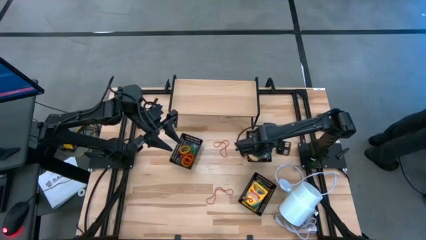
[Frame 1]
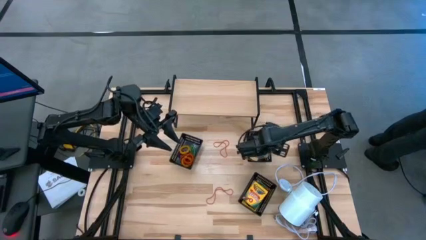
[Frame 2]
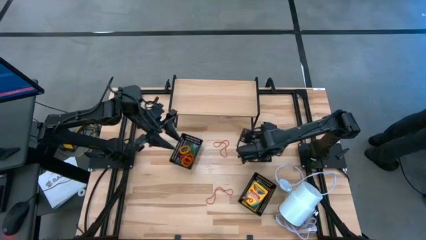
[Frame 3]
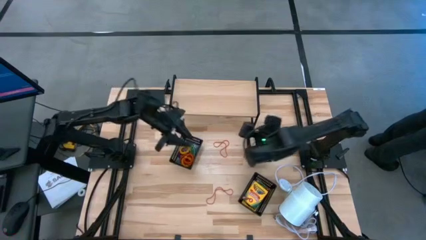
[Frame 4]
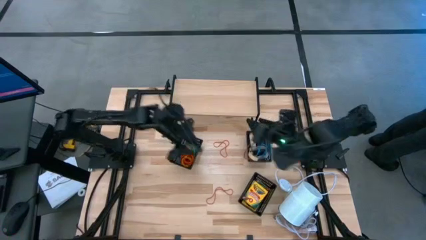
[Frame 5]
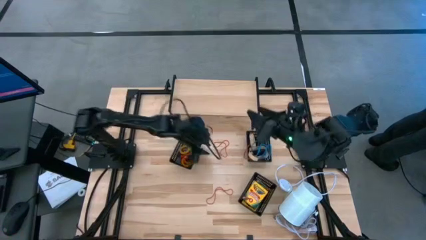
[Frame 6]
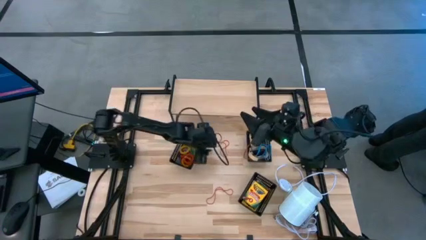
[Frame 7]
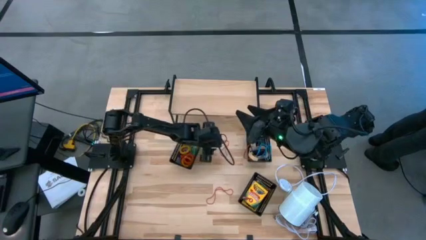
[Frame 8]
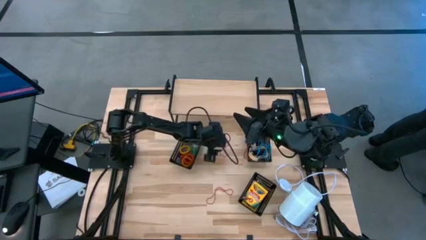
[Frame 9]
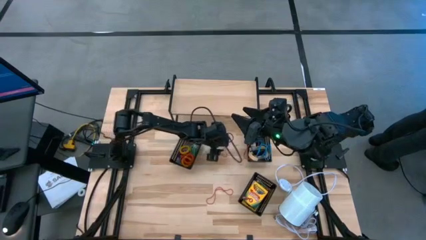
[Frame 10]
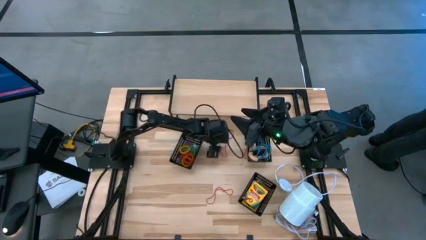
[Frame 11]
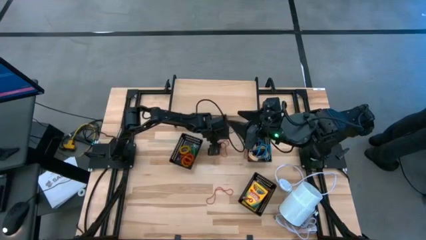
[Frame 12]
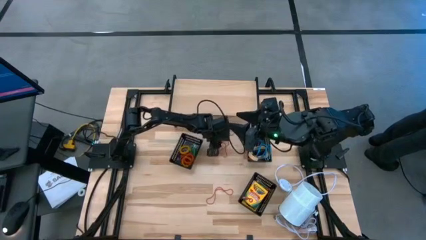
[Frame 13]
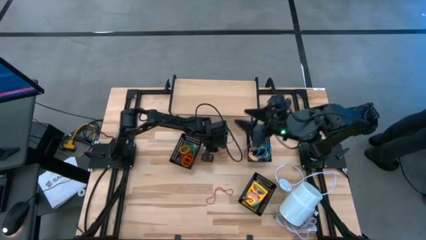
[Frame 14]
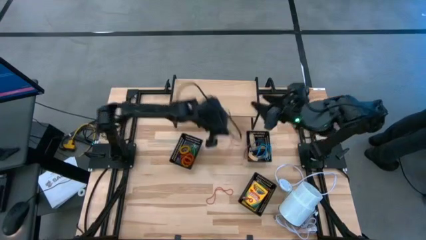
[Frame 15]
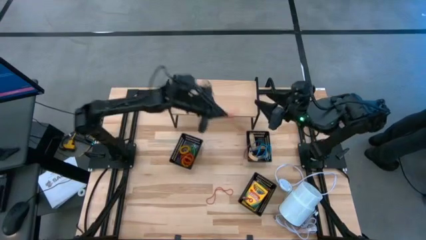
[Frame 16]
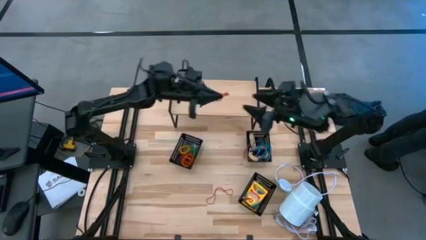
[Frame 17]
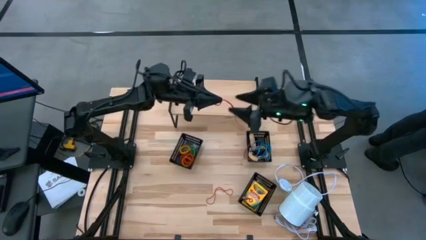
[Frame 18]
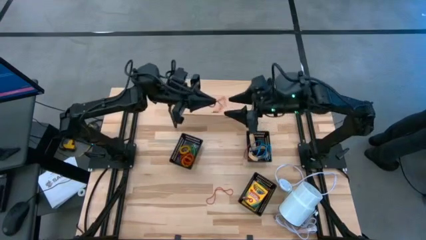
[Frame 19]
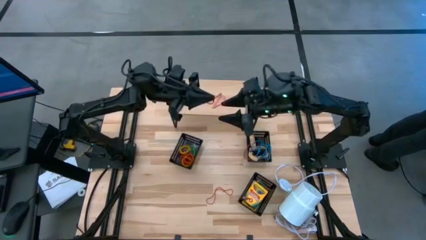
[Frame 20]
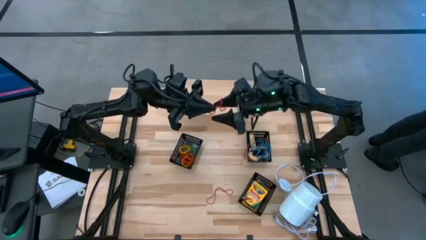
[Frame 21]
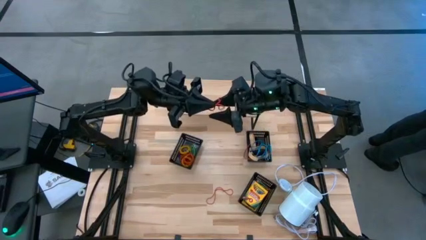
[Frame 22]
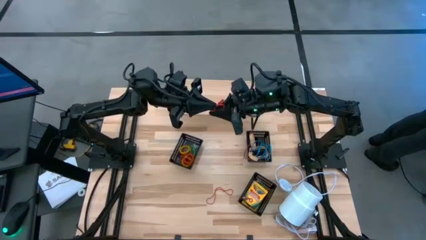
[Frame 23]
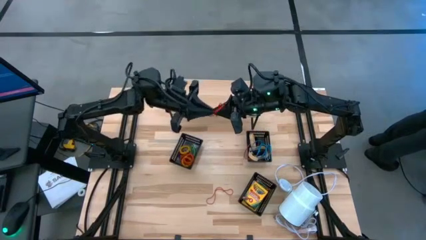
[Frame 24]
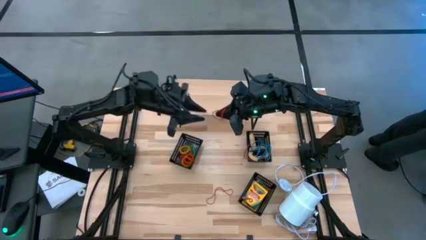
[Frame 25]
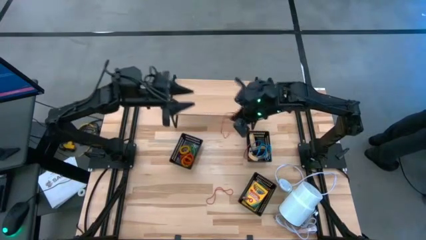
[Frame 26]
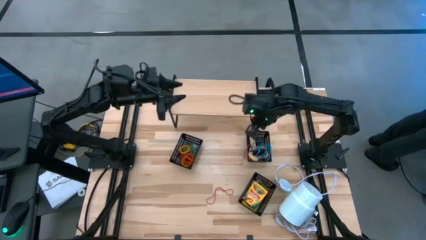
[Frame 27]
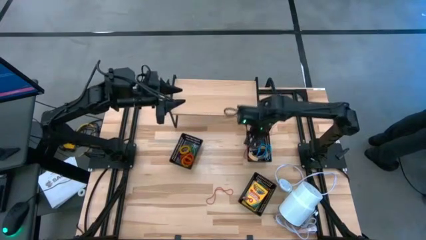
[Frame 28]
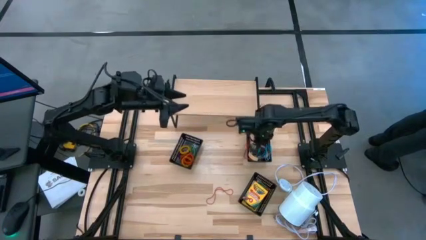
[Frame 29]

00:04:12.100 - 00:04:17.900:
Task: Pick & Place Office Desk Supplies
Put the top red rubber band into the top right black bin

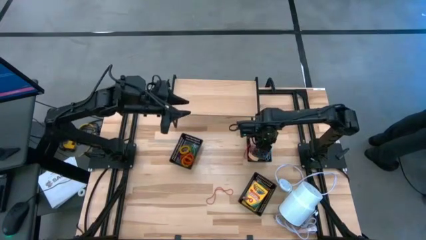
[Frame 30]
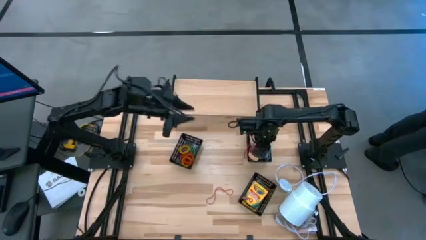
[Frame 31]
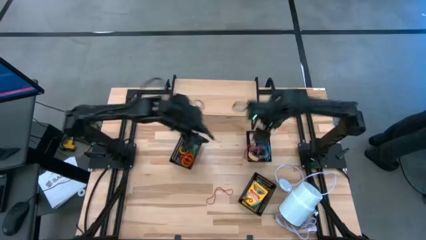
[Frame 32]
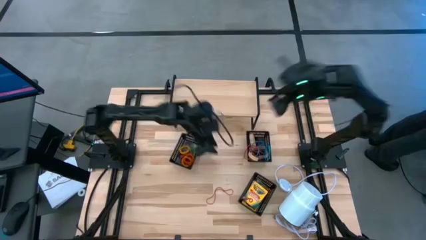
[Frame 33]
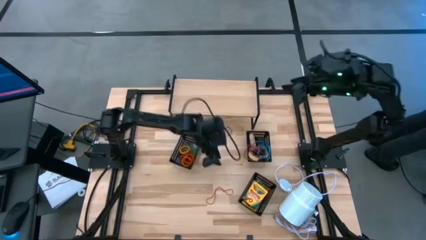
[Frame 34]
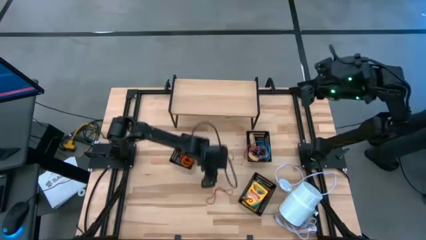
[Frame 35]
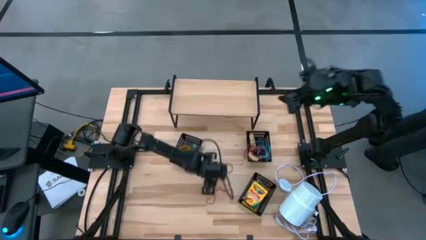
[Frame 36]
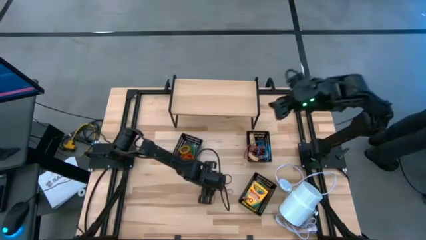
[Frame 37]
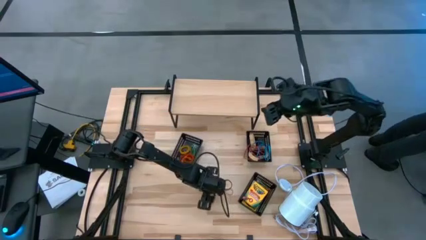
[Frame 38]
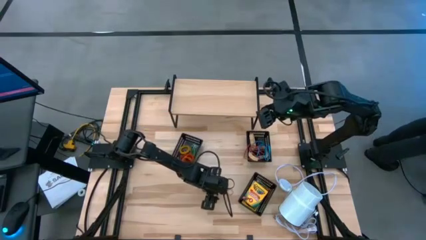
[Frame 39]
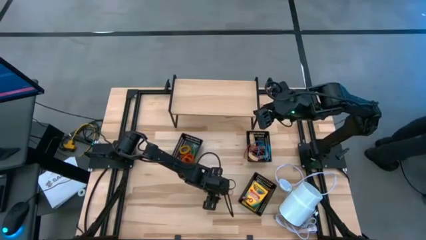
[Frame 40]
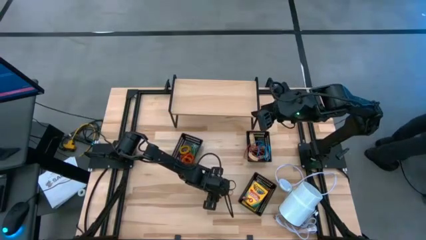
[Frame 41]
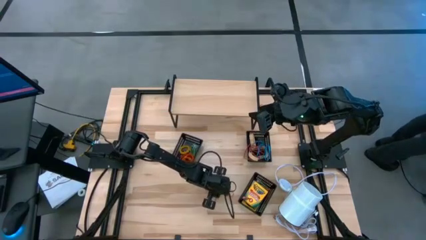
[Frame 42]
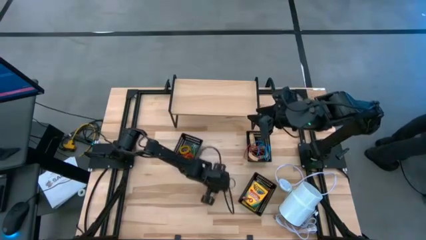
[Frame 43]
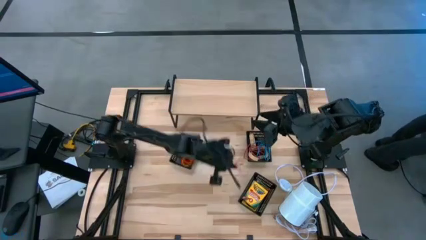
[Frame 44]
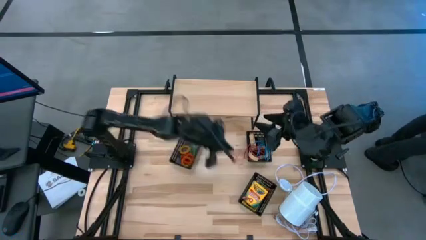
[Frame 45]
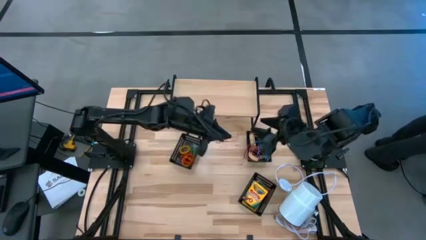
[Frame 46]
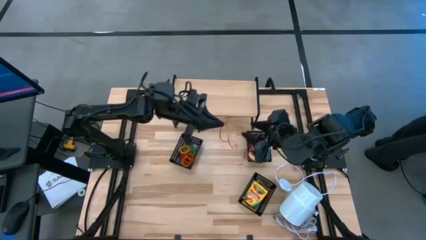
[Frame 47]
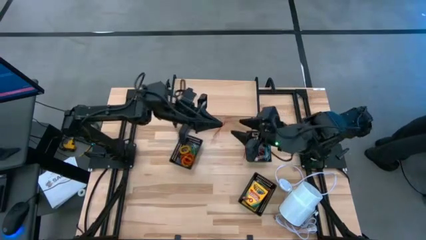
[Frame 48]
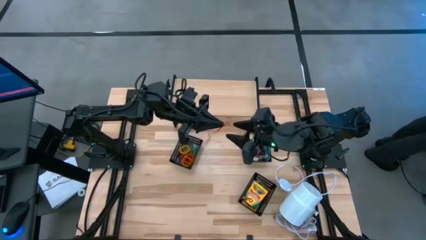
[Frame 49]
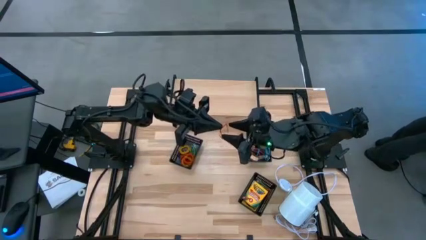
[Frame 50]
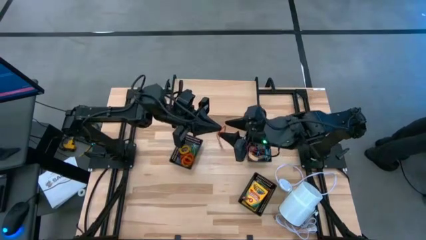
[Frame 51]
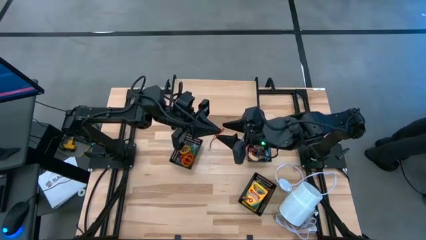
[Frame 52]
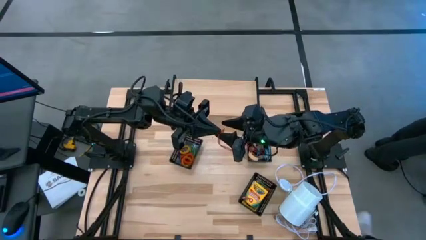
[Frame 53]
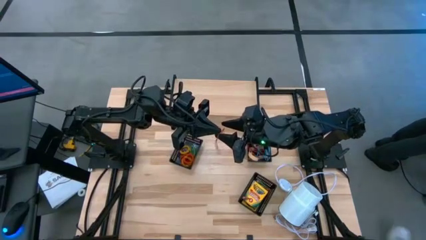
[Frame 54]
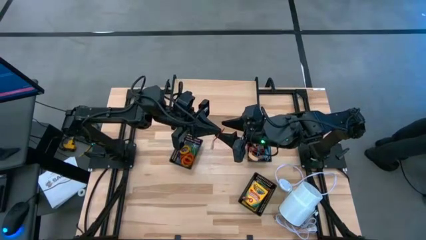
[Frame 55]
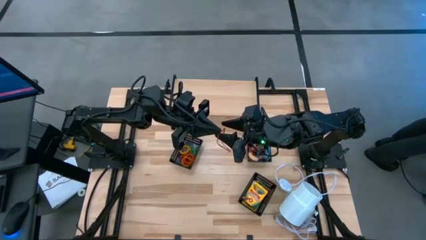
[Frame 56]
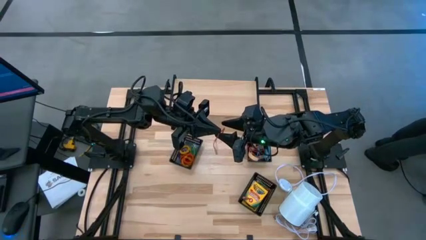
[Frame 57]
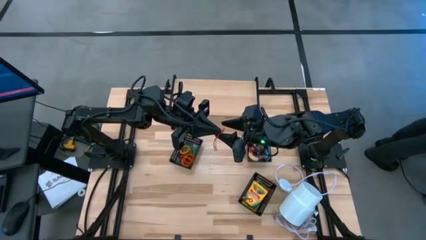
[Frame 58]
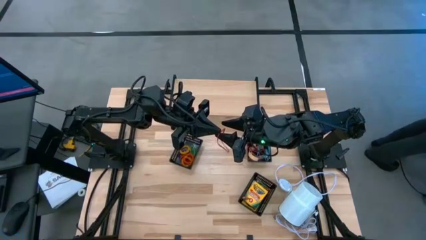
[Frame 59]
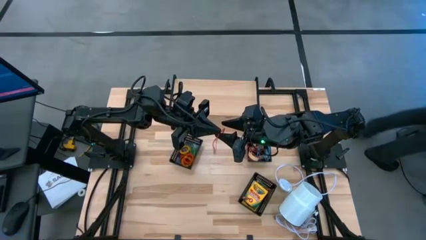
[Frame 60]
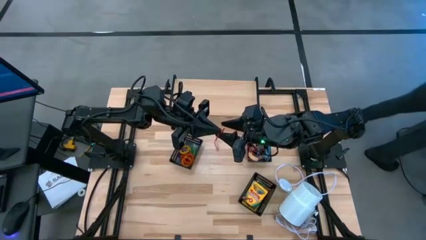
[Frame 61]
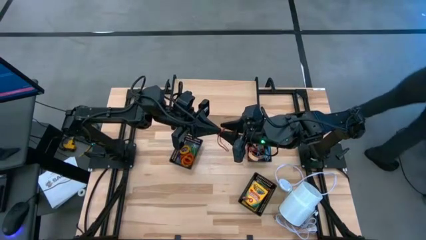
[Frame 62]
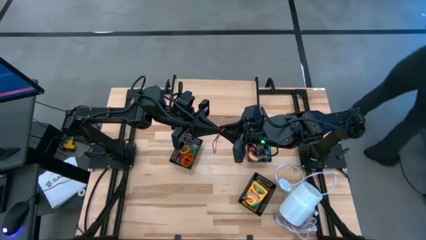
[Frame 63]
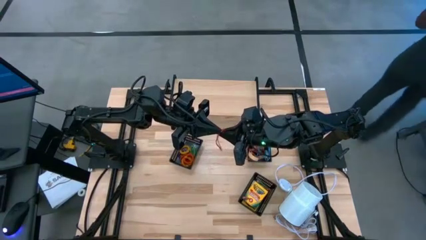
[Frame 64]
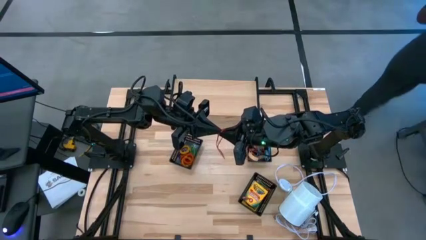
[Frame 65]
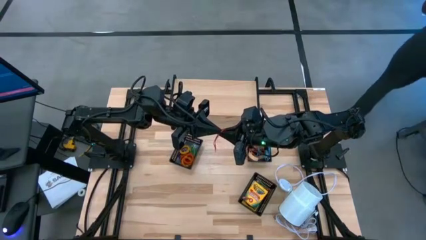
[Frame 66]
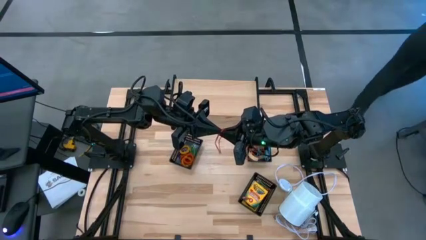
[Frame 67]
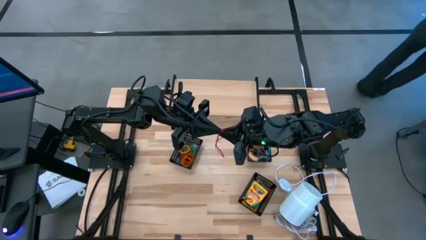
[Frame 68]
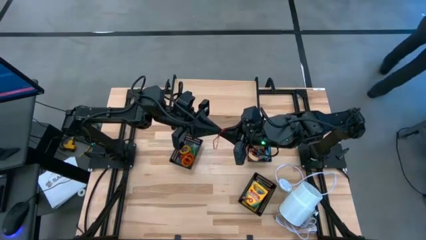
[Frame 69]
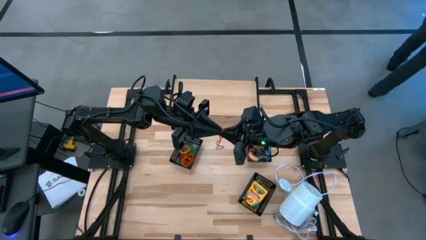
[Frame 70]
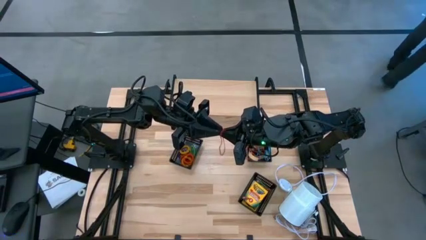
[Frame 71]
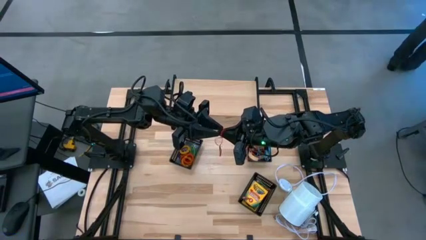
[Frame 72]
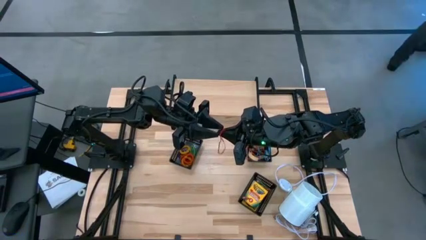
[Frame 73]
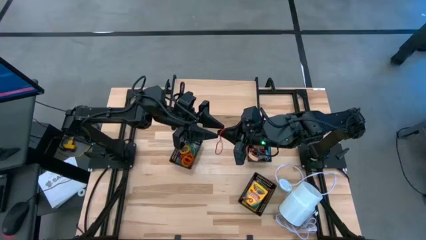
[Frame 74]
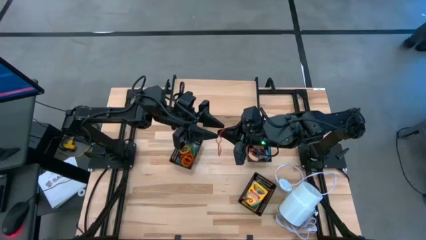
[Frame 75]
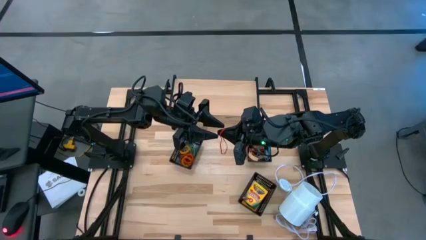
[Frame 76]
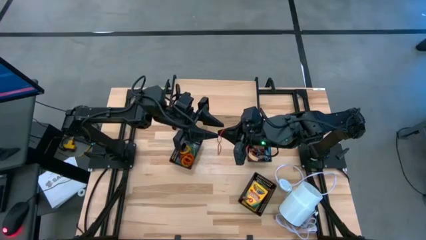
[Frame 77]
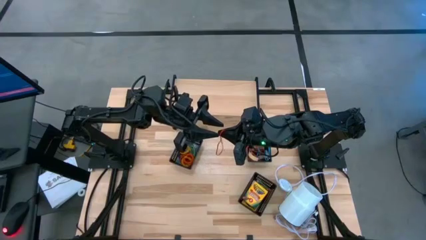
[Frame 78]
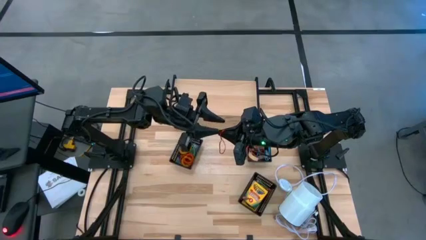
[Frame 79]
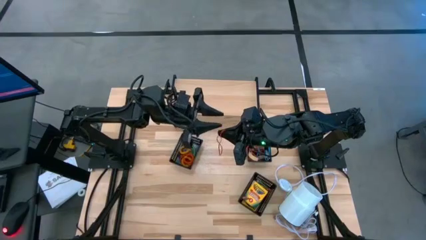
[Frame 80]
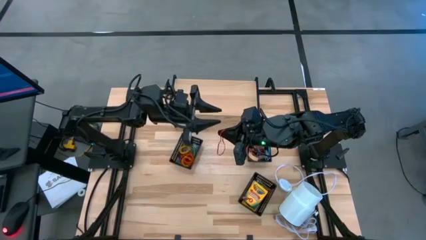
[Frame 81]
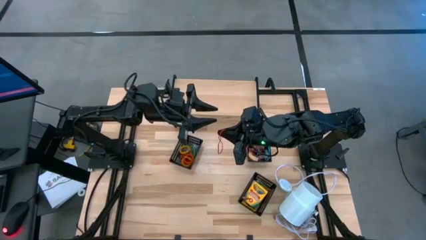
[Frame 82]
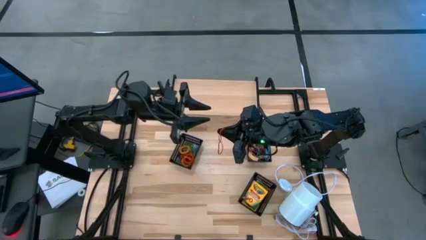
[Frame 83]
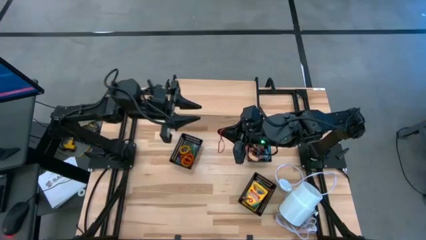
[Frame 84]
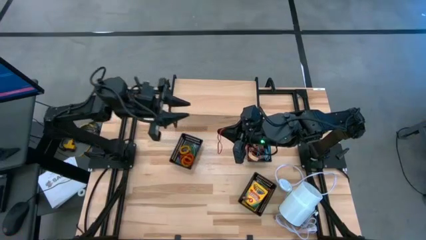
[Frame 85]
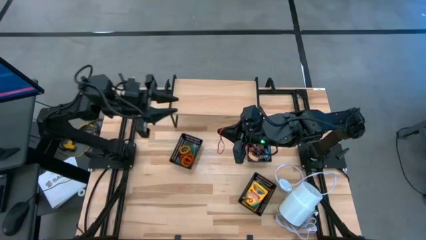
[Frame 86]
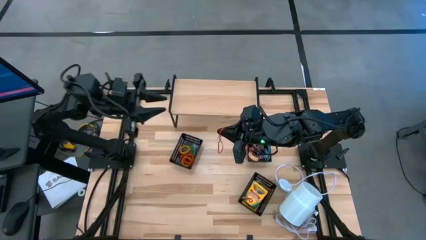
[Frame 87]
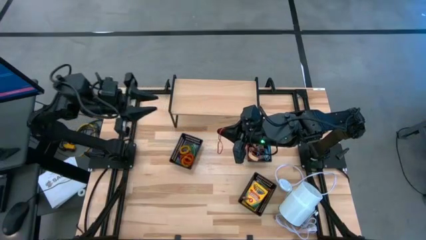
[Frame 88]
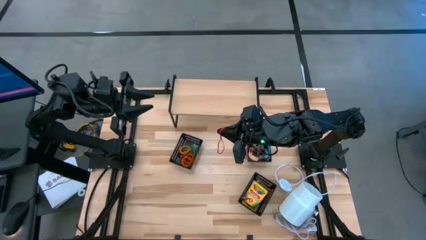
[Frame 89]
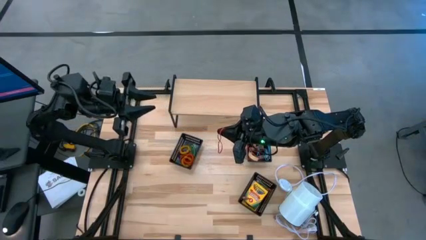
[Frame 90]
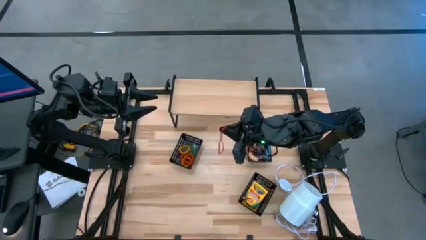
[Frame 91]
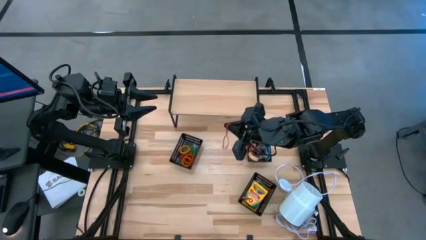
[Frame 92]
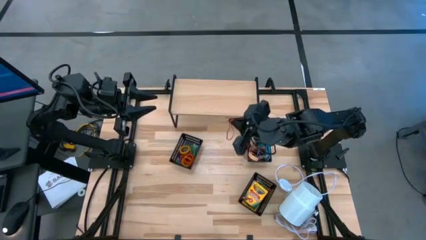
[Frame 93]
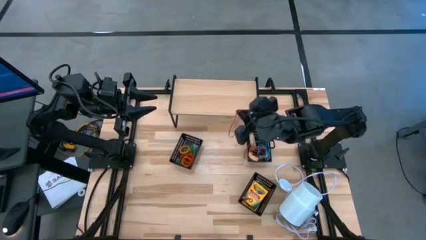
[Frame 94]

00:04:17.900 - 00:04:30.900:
Put the red rubber band into the top right black bin
